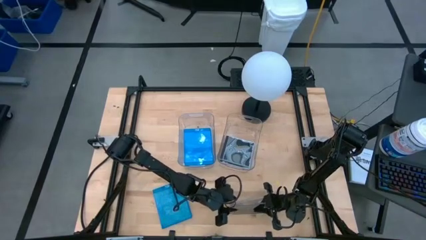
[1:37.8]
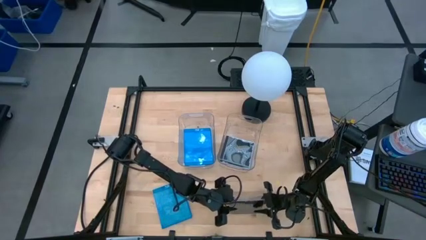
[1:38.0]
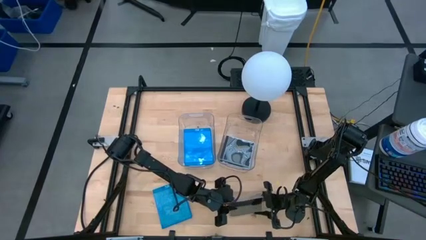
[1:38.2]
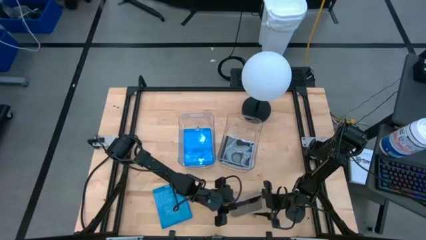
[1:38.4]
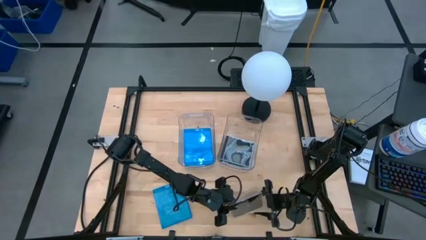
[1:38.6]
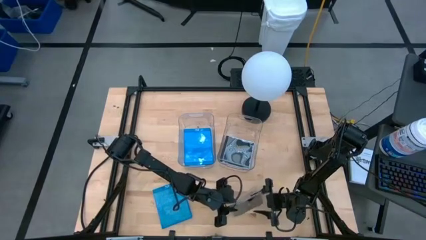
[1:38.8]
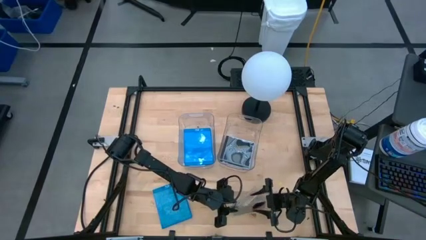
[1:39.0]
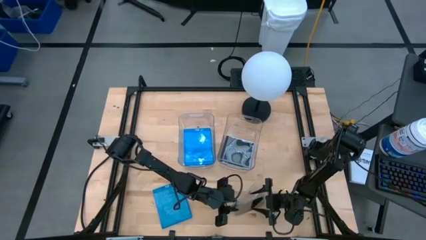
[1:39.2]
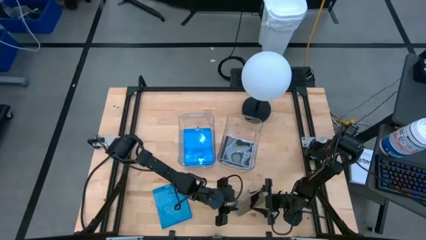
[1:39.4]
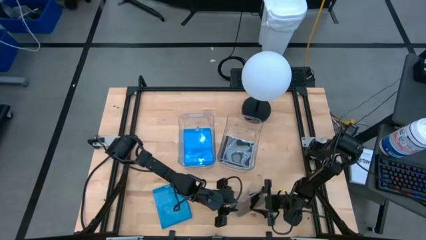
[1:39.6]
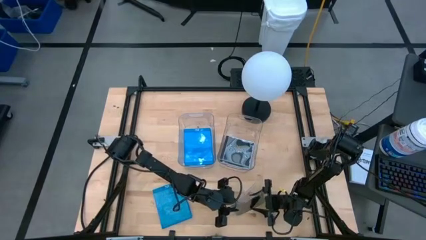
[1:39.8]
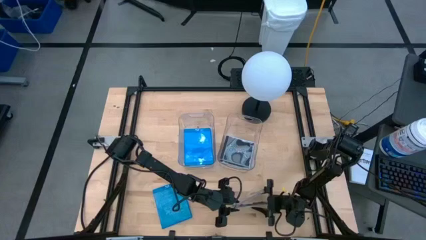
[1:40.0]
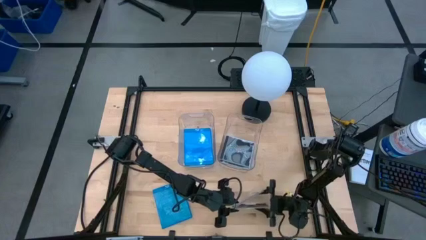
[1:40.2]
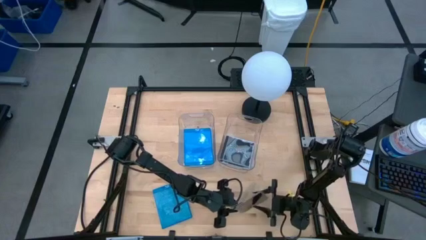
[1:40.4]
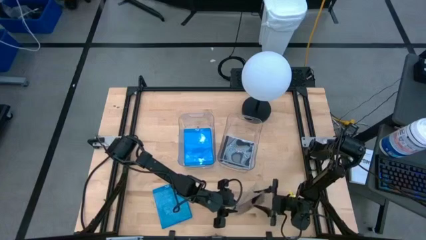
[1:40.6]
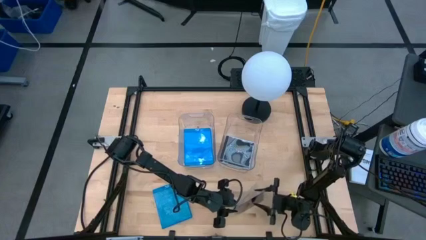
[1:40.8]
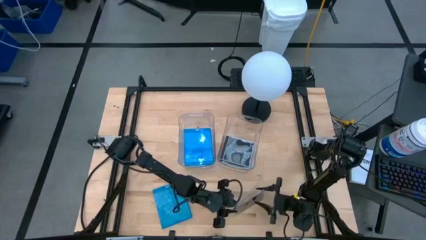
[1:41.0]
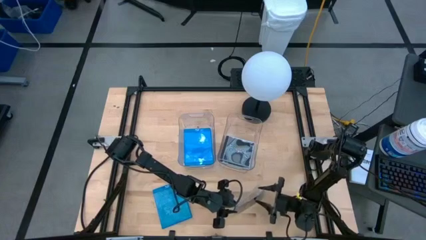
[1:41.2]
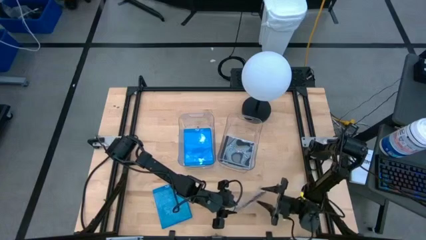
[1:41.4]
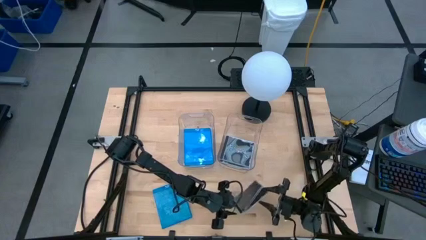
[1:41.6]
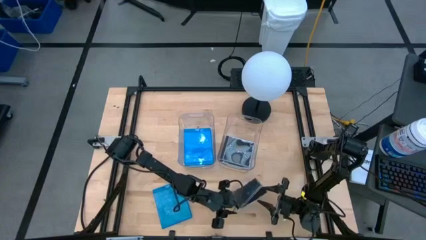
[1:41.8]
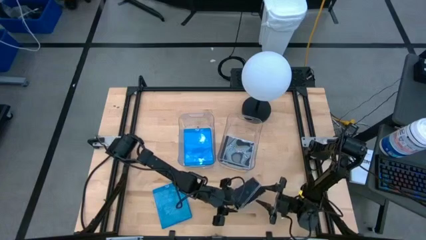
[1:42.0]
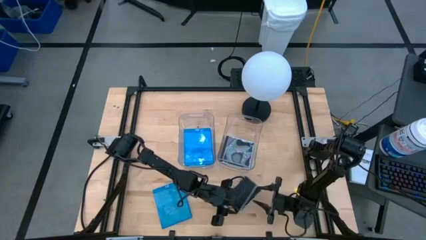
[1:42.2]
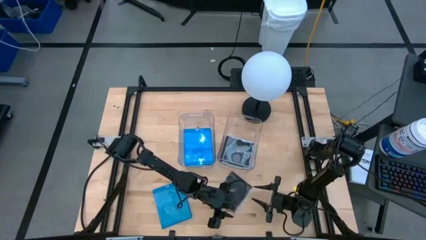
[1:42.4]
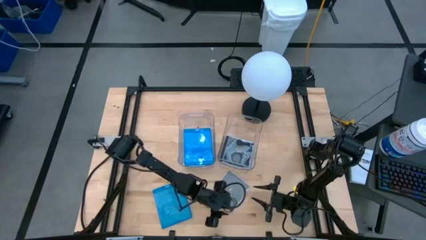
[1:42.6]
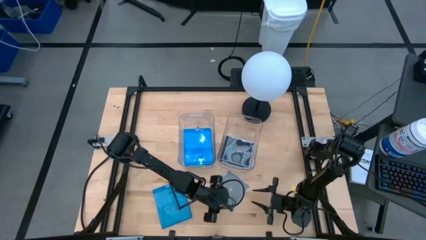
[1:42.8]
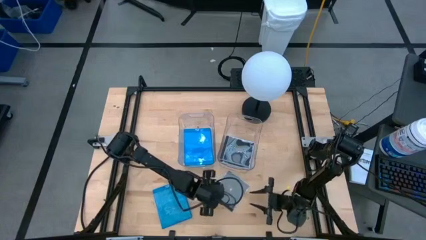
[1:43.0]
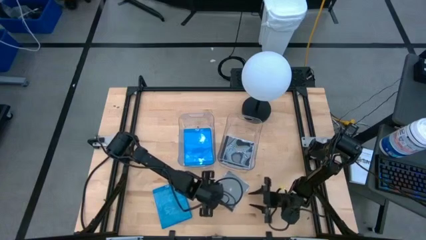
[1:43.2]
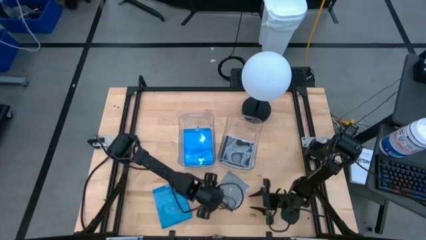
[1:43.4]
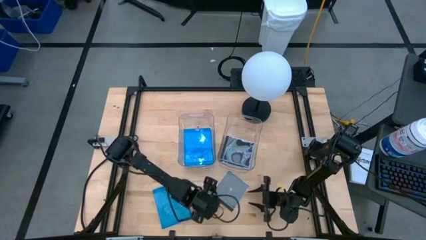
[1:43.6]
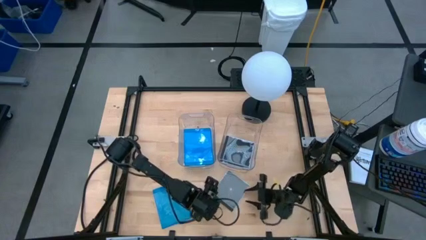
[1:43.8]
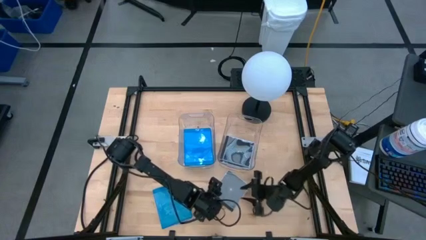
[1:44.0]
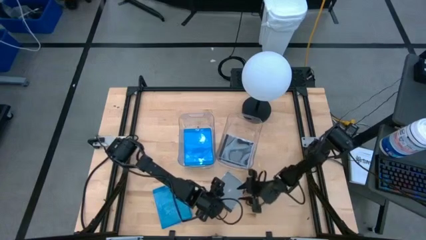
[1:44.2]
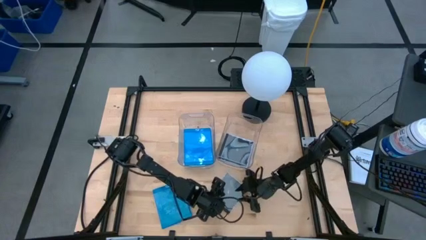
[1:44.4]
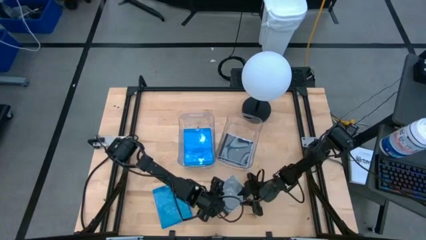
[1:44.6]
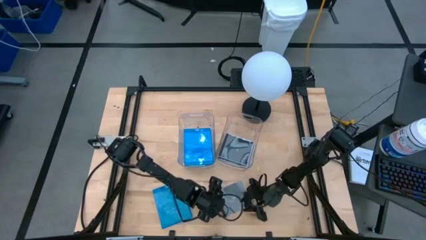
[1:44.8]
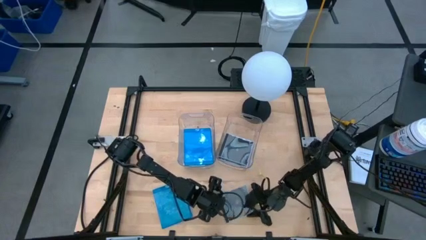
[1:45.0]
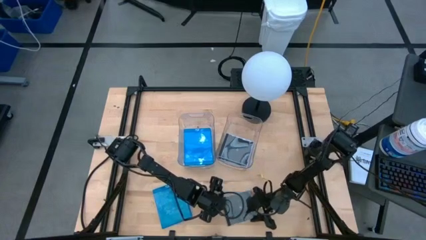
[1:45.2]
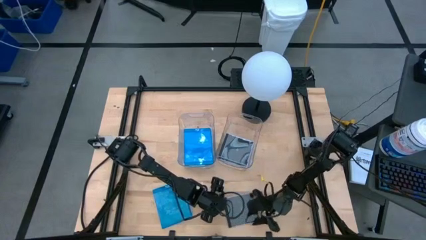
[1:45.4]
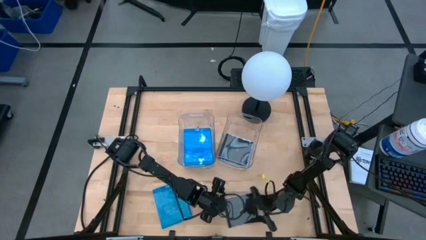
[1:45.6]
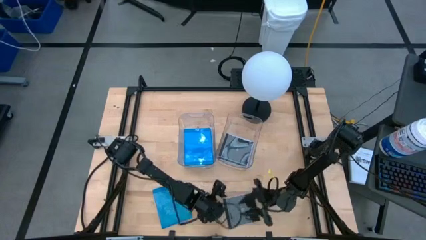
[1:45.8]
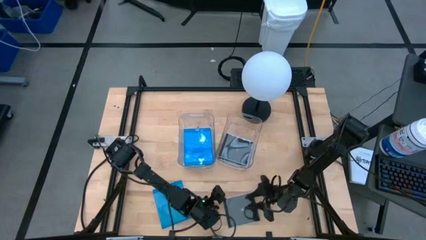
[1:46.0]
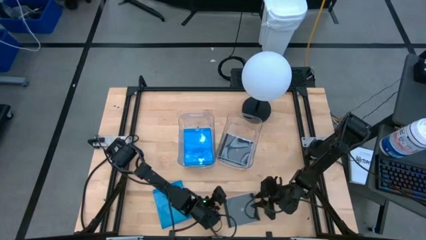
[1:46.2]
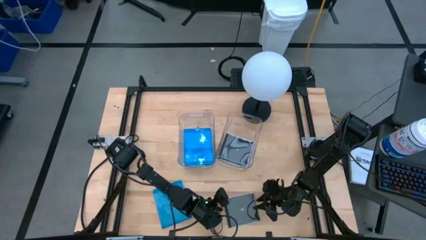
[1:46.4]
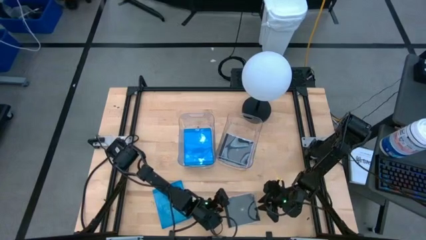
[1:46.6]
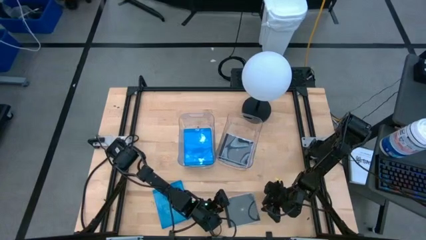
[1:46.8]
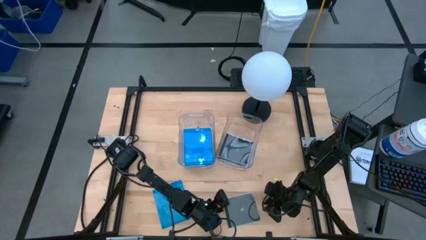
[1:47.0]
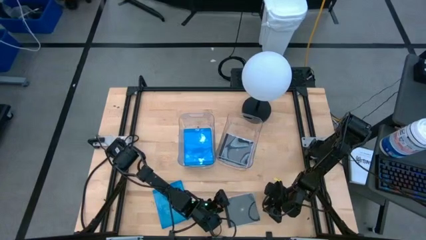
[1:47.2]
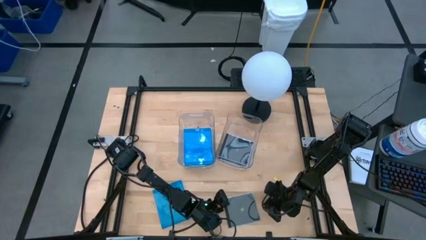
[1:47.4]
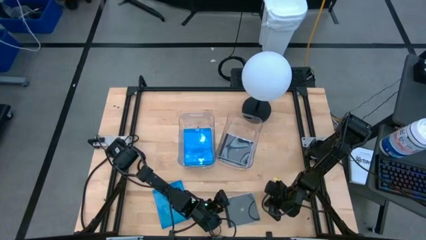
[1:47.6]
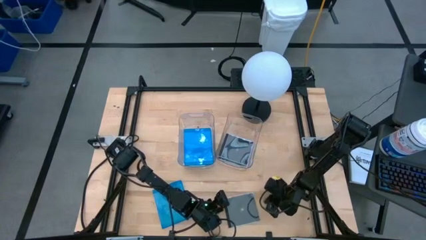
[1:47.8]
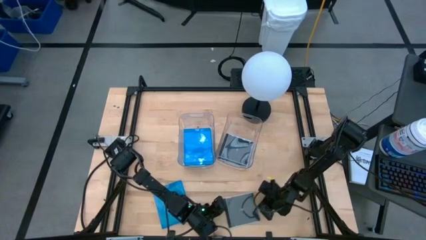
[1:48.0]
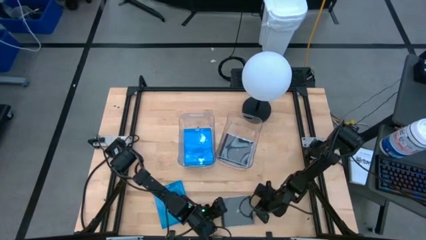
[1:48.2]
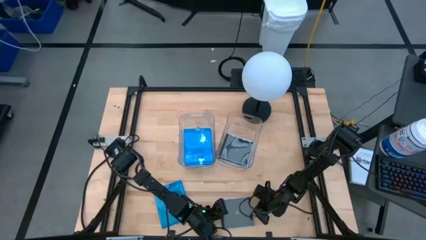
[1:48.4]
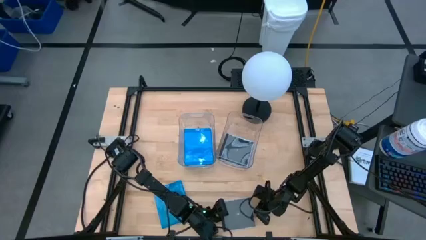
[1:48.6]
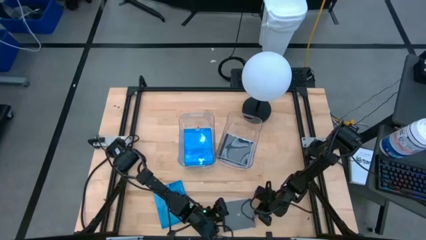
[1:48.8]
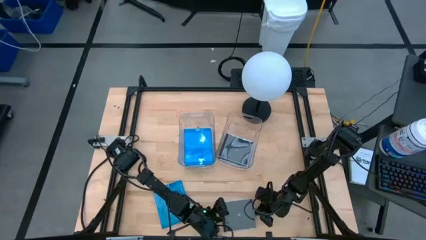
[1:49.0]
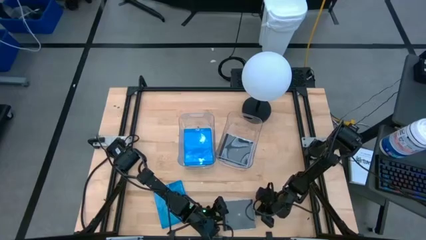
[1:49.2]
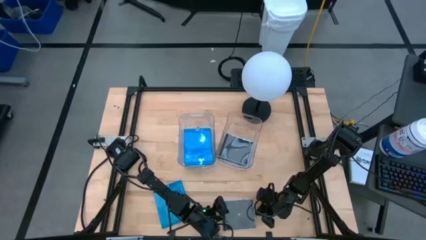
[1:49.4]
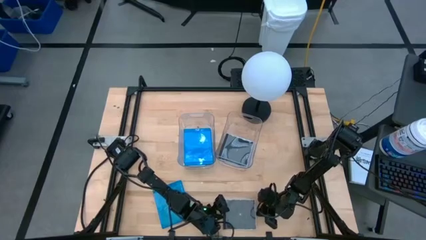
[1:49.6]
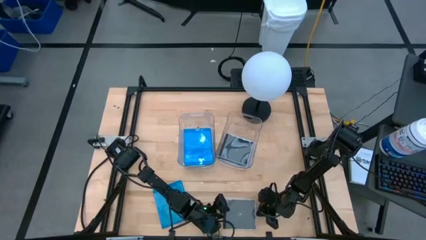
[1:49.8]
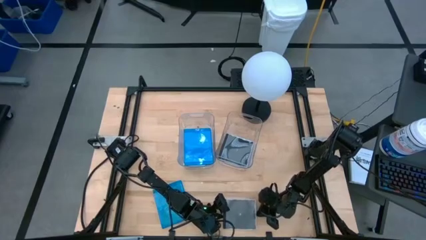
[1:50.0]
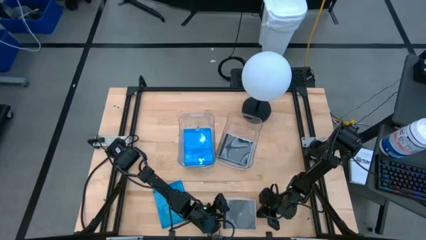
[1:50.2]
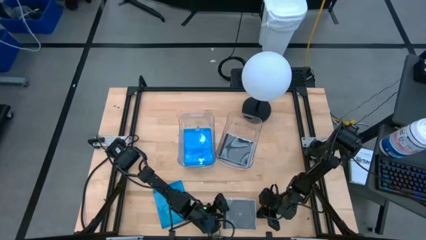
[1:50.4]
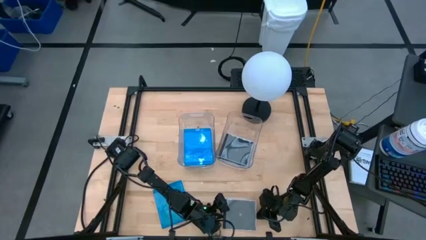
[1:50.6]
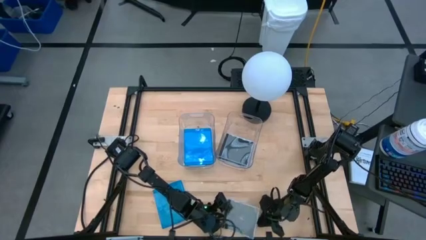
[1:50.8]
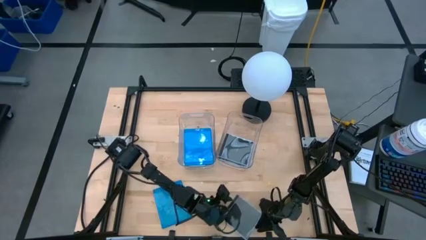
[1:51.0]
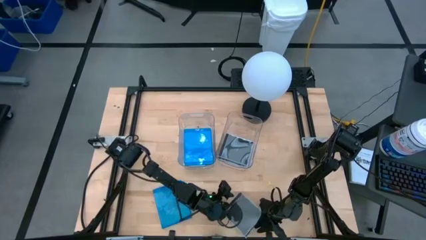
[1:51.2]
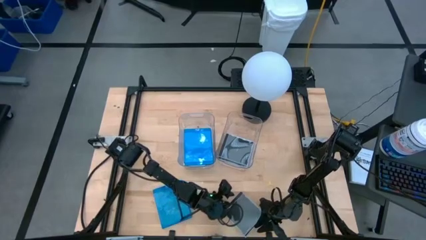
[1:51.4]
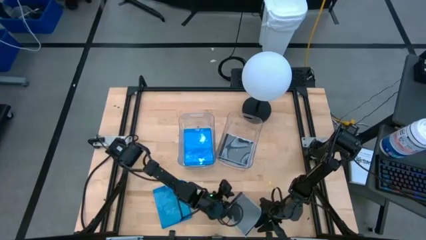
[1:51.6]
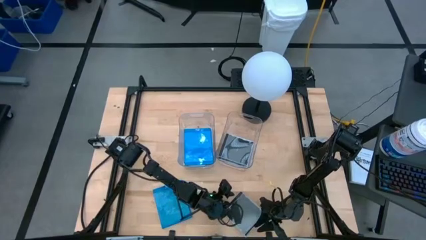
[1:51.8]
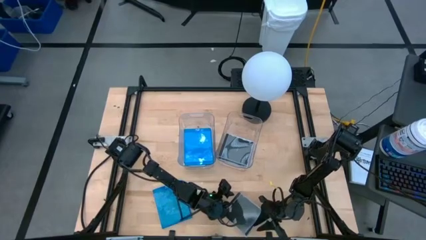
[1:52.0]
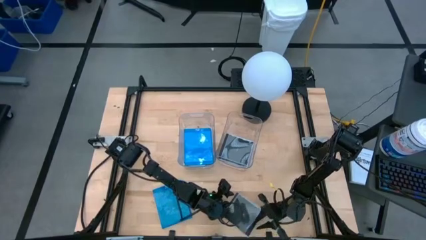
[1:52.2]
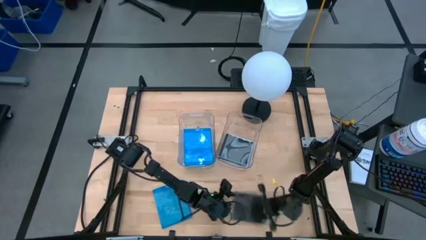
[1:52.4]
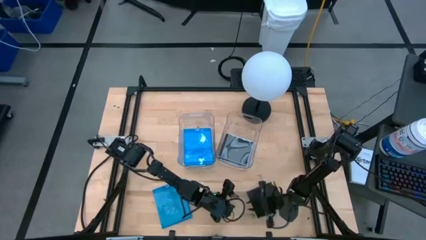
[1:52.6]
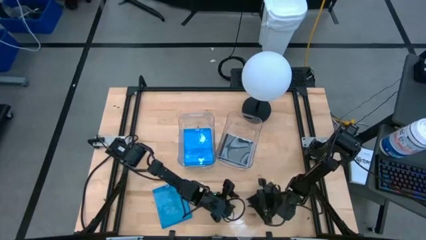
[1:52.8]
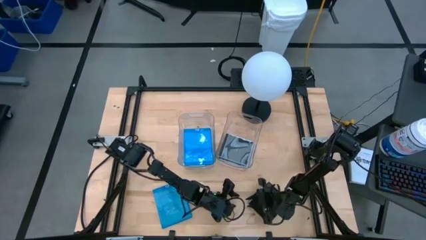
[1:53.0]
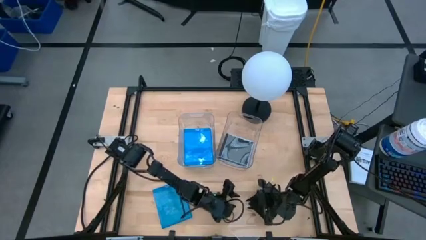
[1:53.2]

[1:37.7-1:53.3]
Task: Pick & place jewel cases by type
Put the black cd case into the right transparent bin
